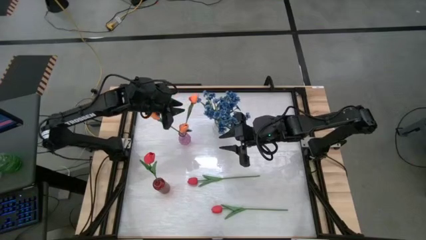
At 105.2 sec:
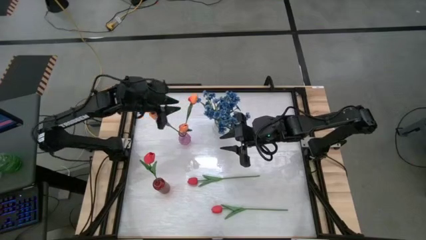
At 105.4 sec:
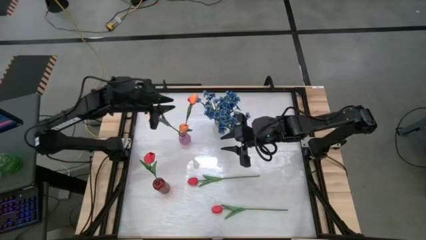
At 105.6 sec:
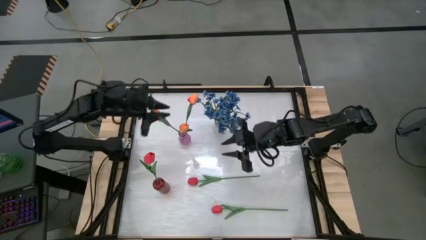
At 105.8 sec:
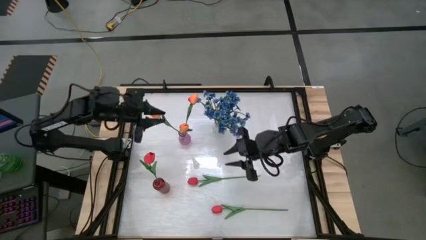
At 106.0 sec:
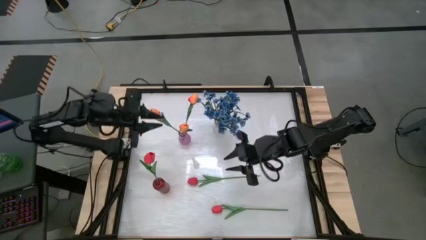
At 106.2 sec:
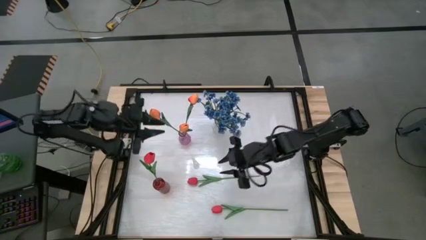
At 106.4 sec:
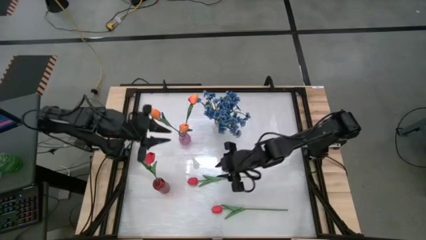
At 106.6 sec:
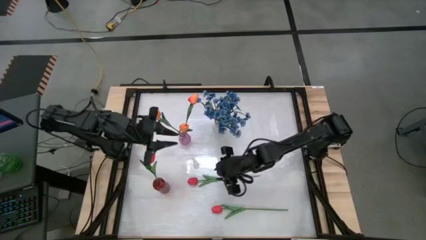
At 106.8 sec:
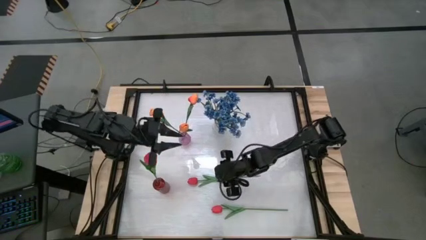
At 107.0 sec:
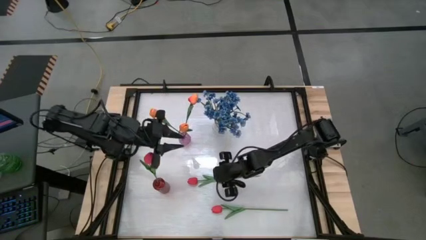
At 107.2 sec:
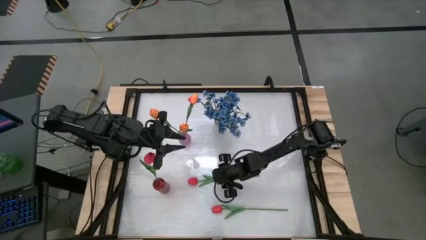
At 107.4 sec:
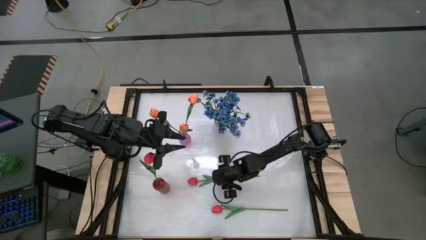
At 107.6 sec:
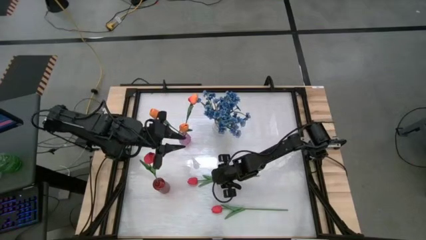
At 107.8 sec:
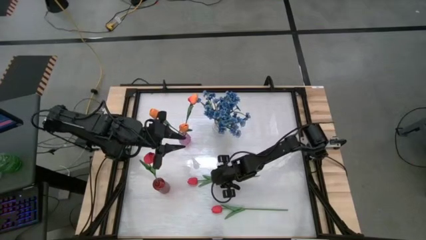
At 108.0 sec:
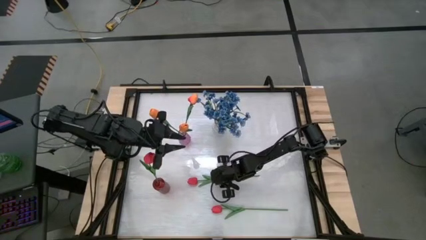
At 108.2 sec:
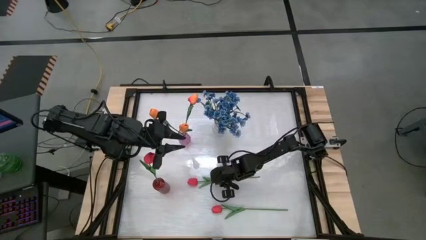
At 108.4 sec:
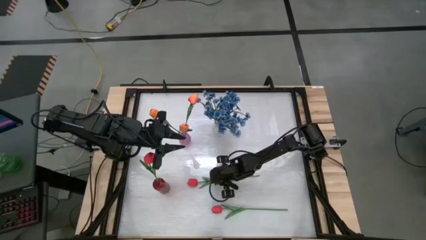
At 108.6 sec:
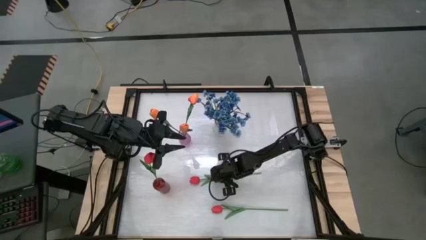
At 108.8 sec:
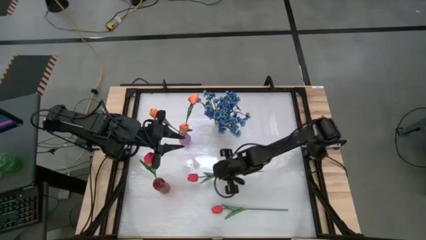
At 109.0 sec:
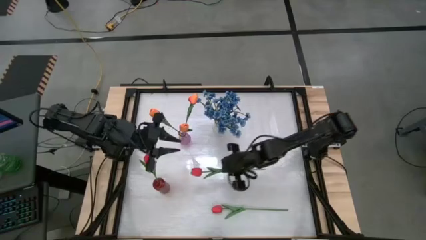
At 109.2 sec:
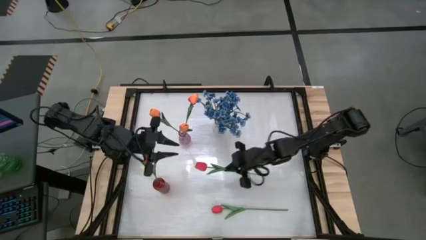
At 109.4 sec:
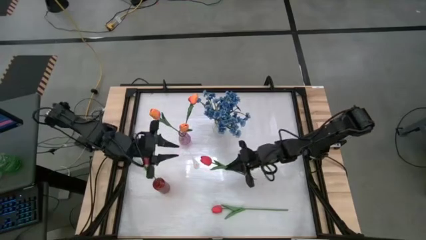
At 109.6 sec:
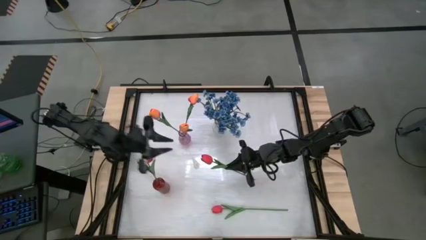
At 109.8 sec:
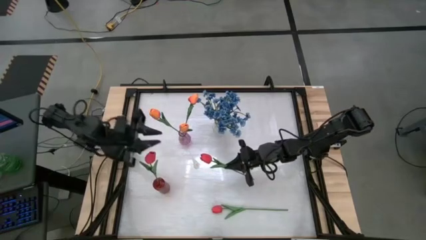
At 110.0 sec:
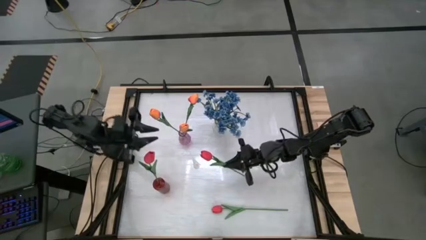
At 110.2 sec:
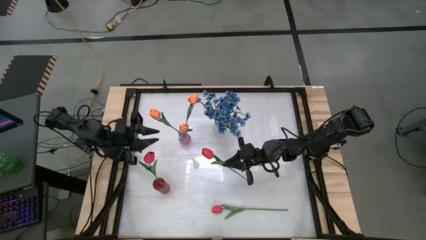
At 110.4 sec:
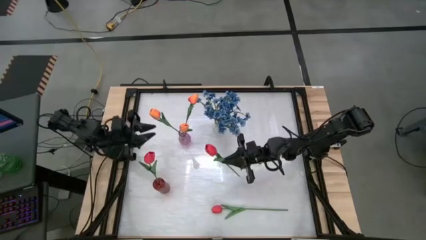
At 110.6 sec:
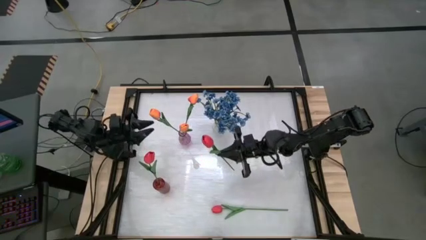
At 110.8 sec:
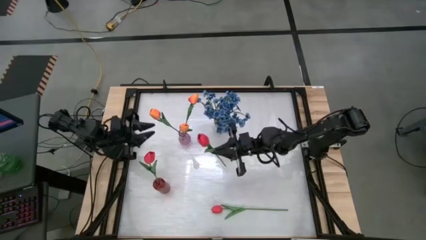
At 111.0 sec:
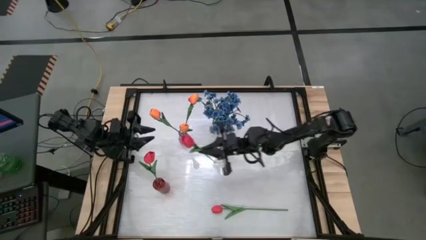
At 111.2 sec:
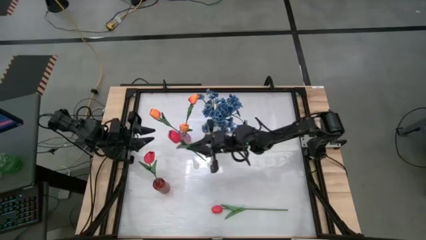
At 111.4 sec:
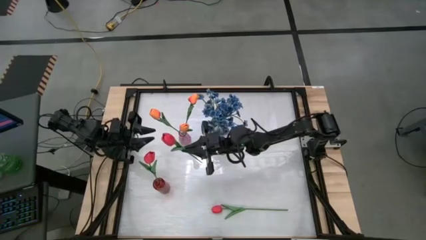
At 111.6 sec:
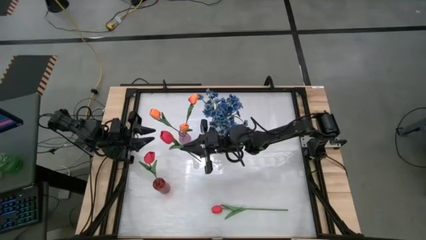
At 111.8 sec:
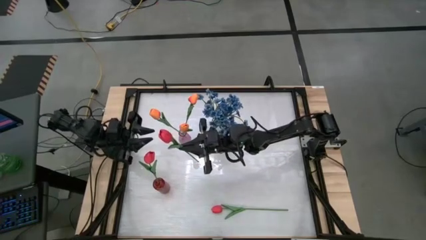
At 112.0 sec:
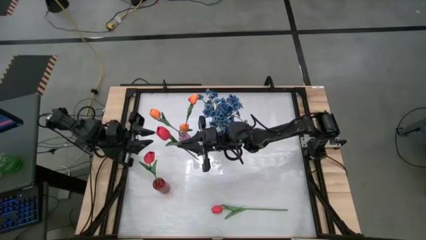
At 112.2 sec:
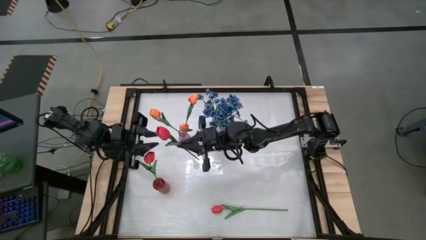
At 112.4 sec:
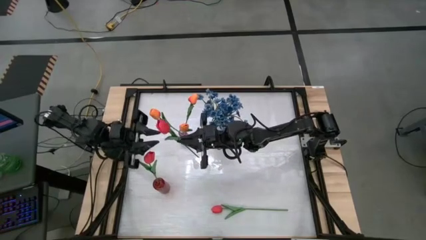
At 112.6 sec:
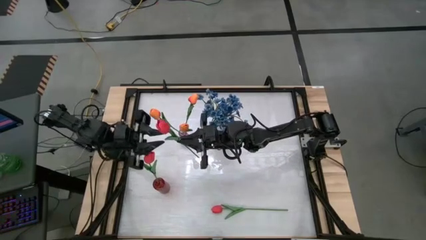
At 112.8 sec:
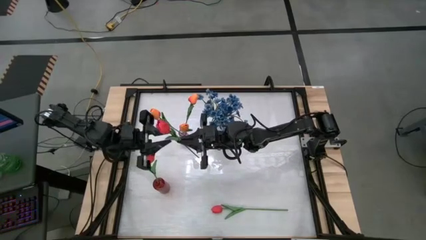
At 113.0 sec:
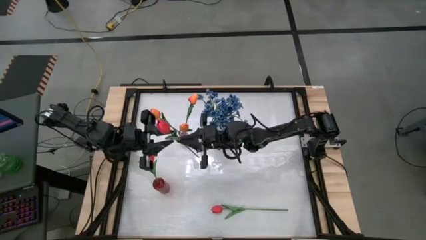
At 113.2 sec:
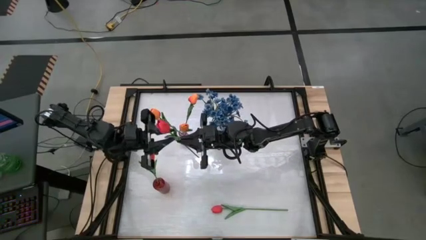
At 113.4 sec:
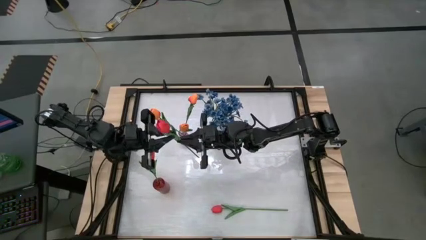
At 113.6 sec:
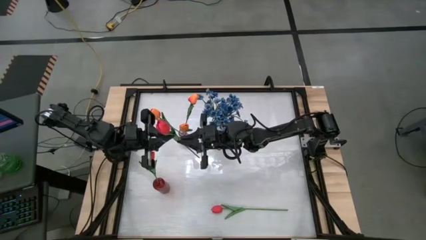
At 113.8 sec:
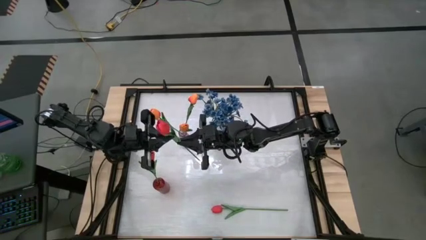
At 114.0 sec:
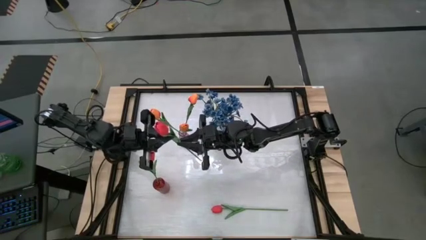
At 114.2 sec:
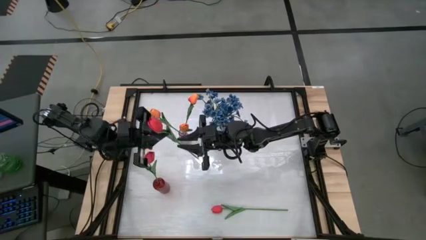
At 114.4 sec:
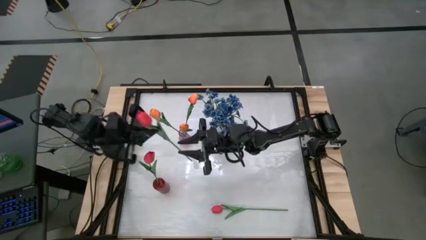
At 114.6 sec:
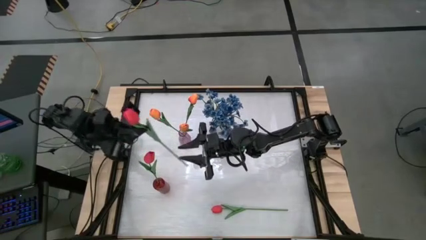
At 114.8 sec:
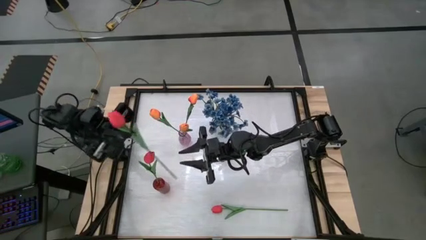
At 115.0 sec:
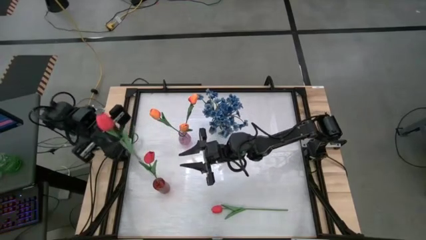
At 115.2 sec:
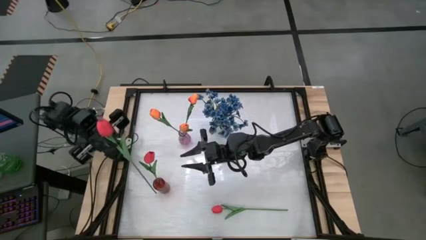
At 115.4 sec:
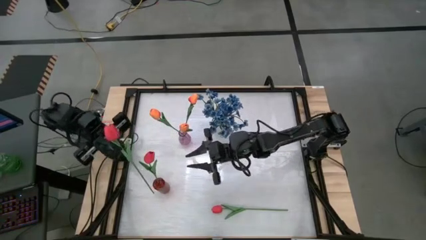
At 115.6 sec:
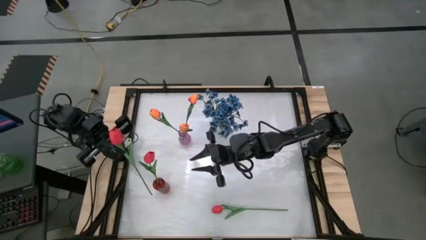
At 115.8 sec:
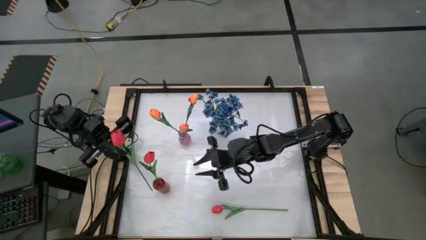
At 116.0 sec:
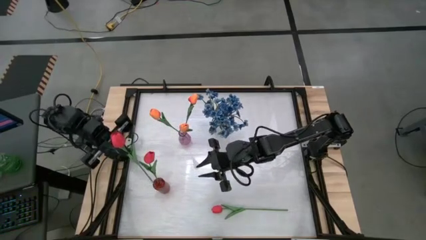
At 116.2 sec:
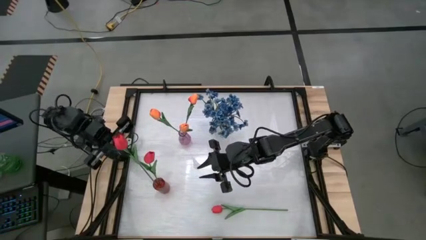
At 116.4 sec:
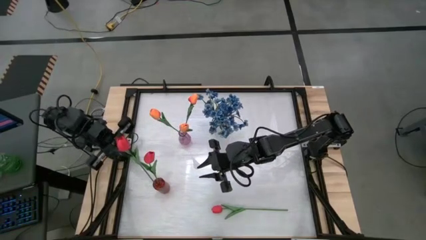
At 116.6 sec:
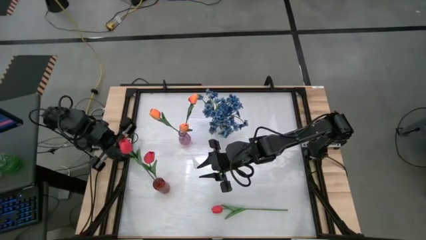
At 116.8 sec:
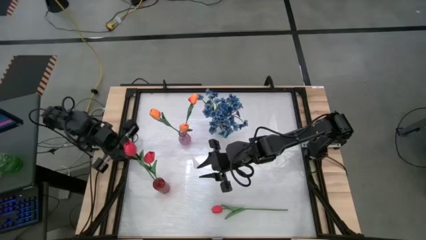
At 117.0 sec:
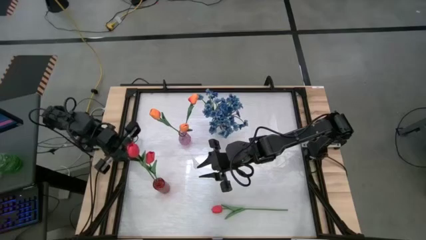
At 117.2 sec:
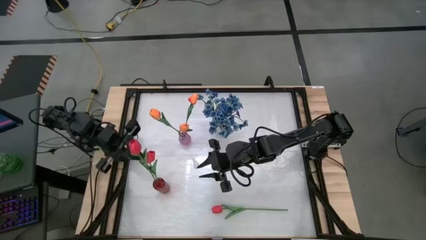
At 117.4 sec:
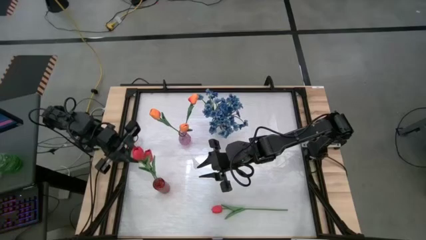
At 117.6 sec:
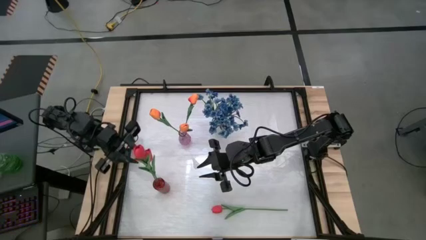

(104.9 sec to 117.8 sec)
Task: Sort flowers into vase by color
Put the top red tulip into the red vase
